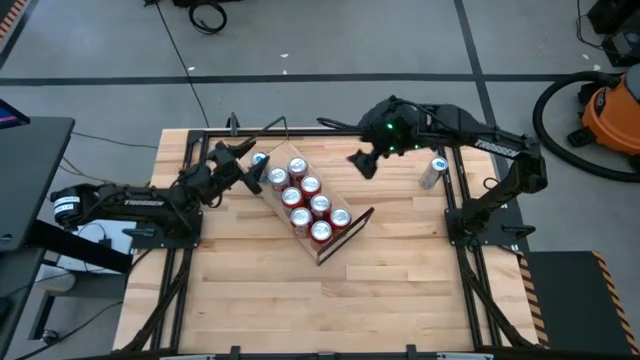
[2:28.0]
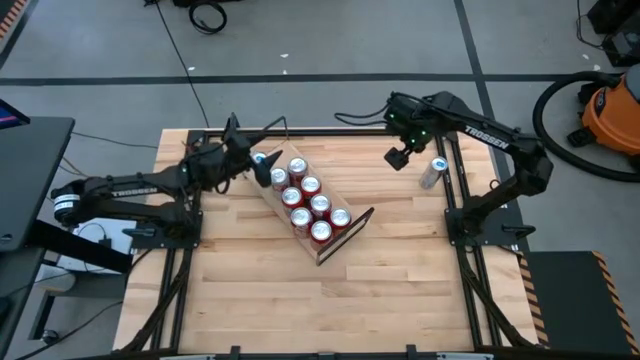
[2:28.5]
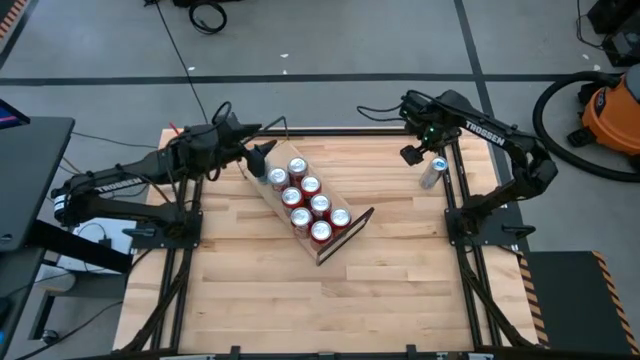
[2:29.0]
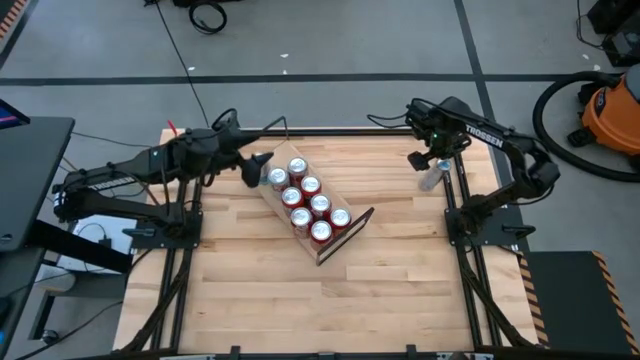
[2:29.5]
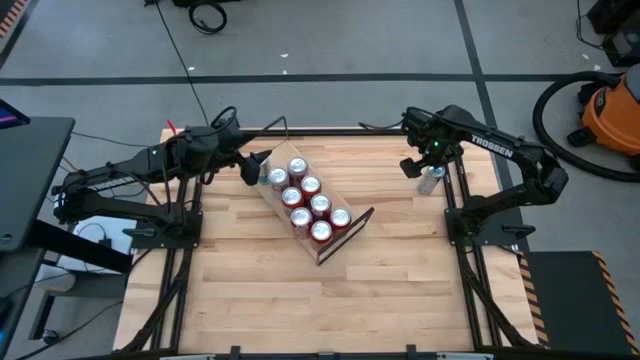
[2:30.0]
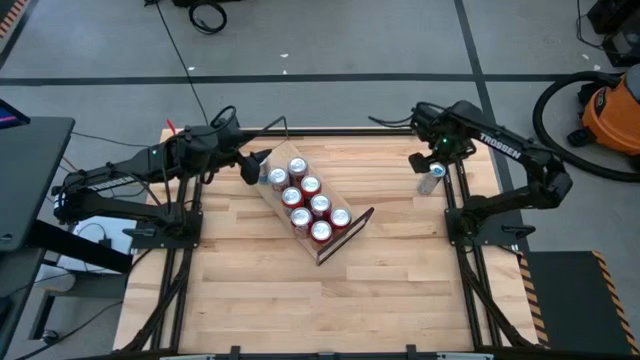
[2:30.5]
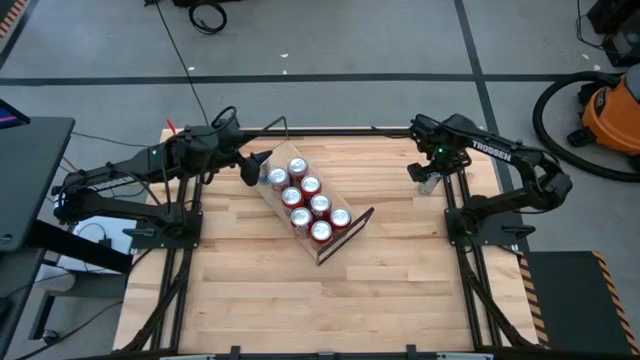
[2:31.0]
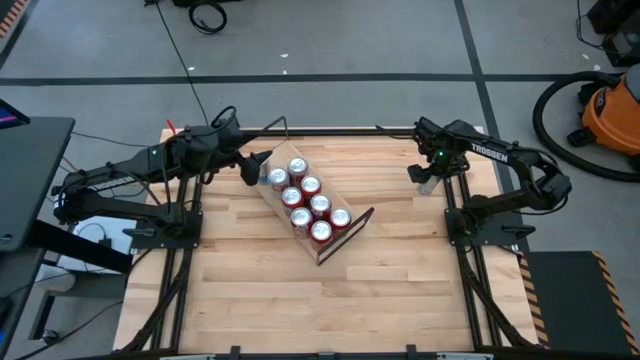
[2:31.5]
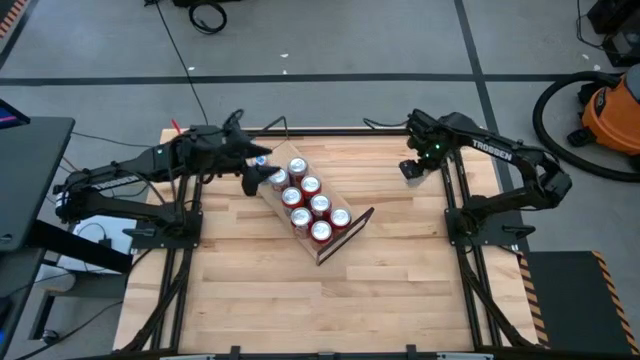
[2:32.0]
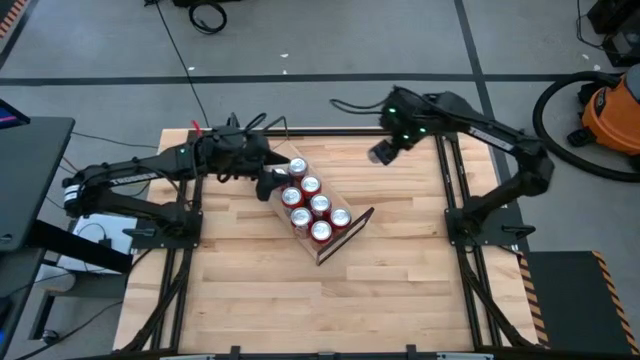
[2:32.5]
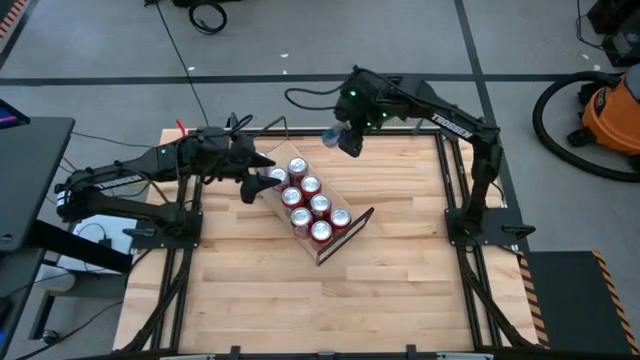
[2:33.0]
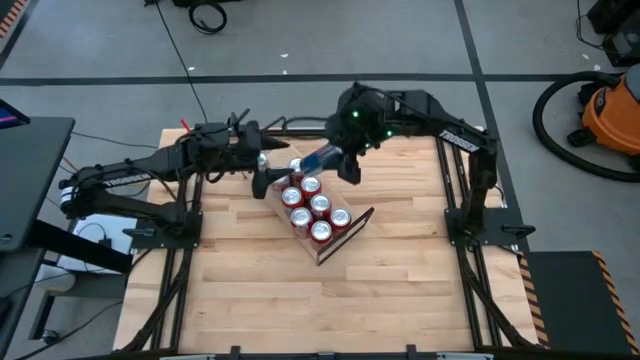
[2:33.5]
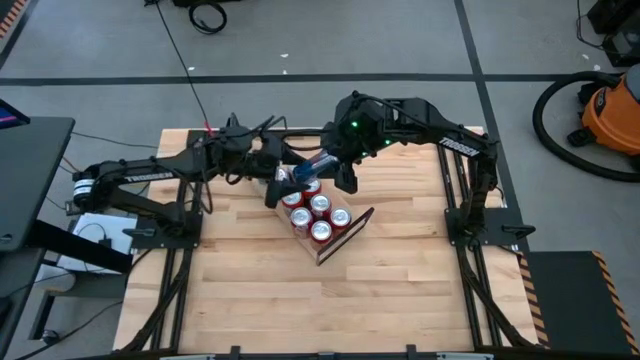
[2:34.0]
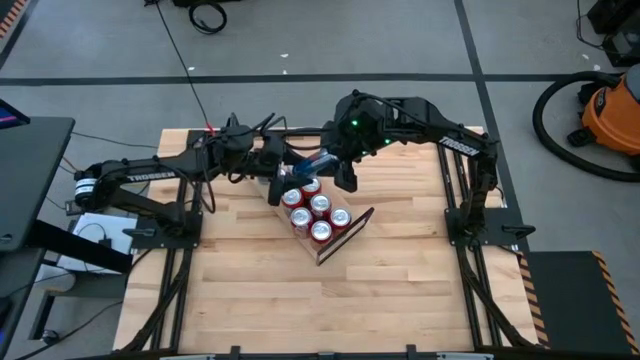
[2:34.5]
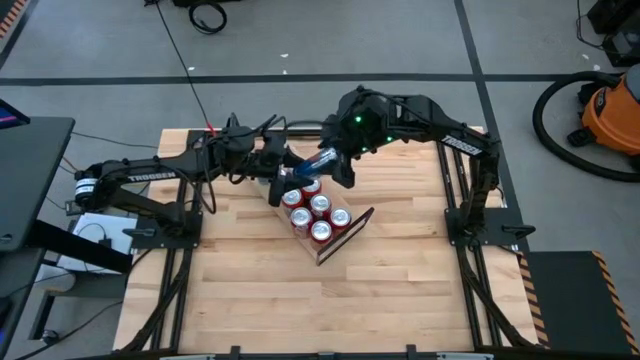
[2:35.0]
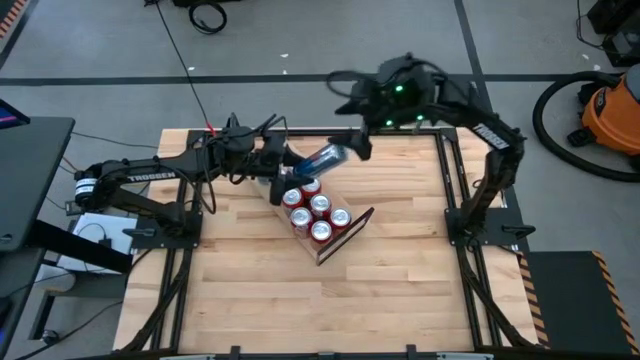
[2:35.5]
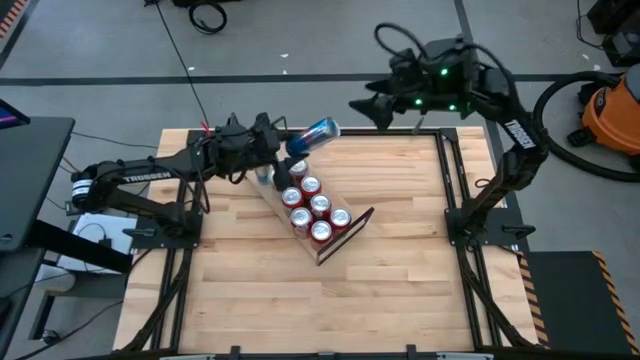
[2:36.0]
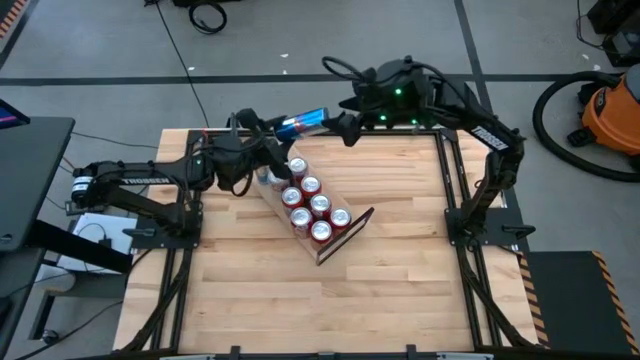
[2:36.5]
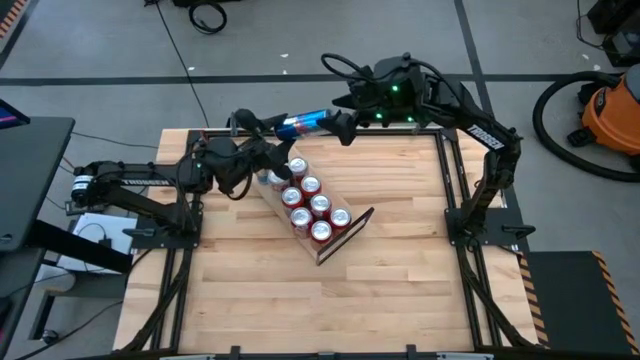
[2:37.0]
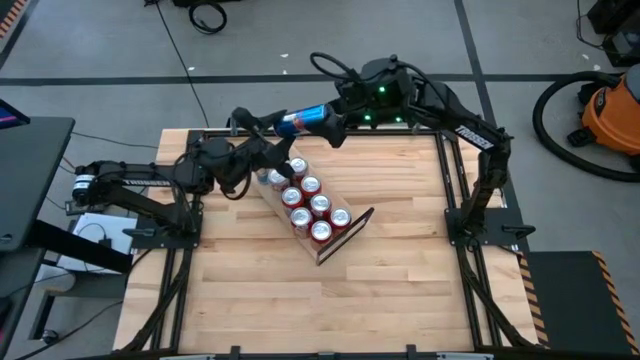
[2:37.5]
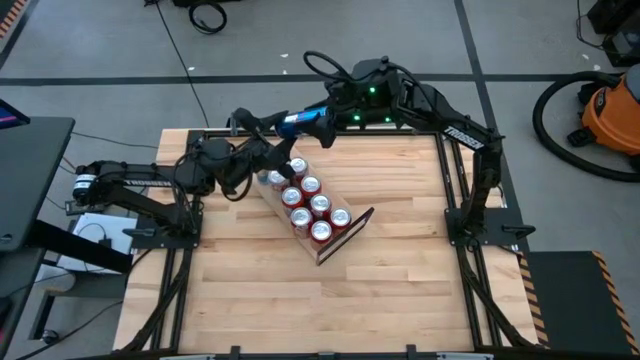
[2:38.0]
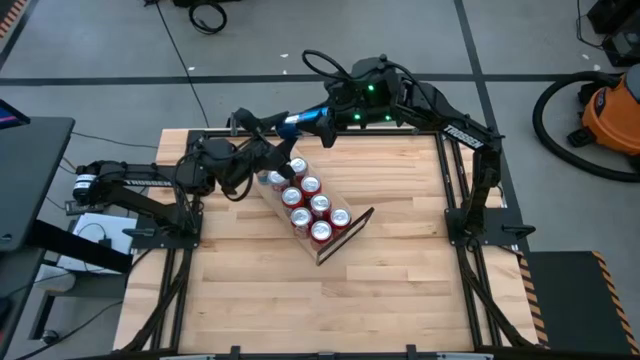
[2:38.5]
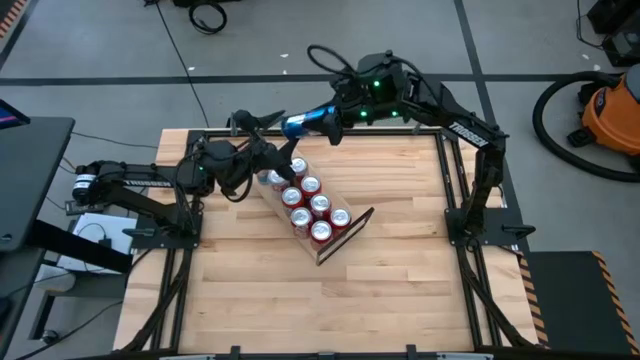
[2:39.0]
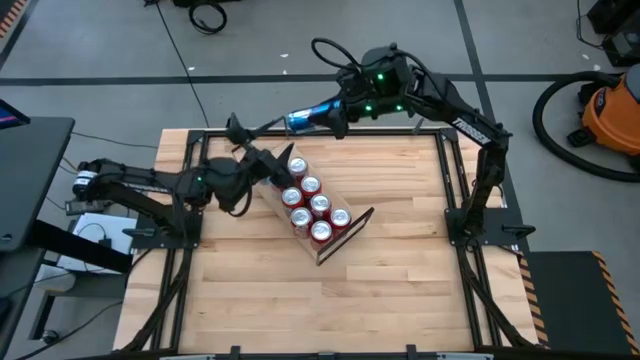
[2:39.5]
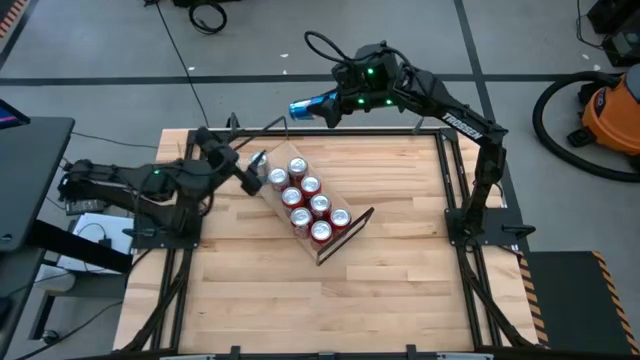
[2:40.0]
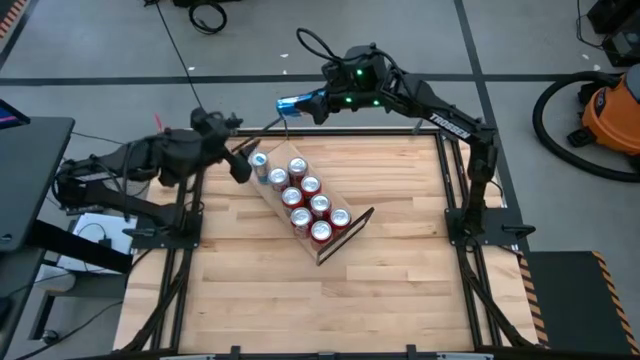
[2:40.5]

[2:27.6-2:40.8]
Task: Place canned beverage on shelf
Put the blue soda can on the shelf aligned with the other blue soda can

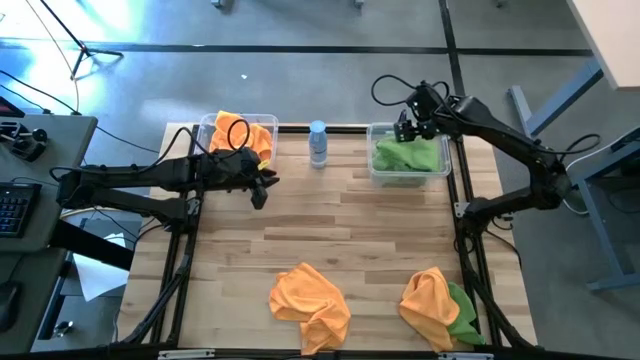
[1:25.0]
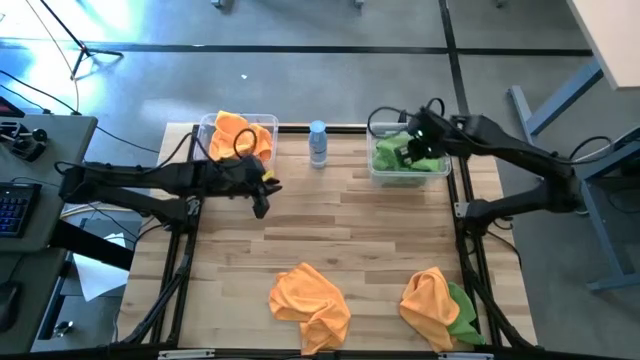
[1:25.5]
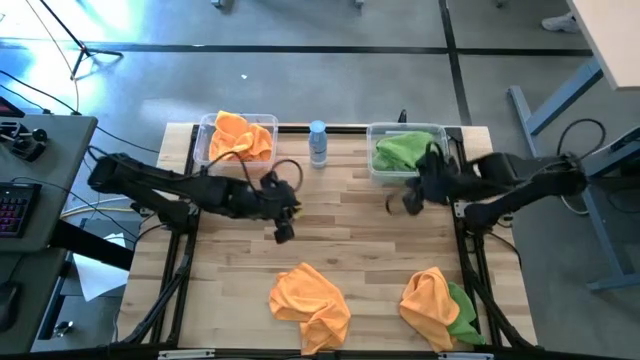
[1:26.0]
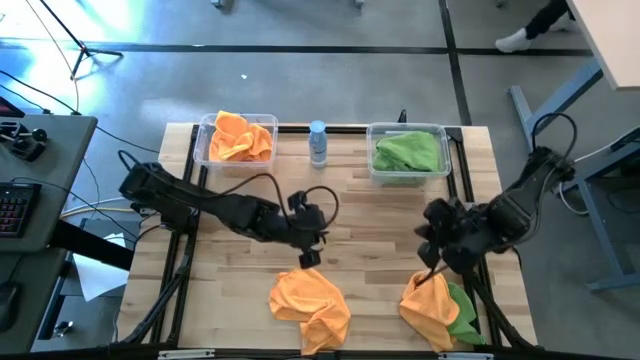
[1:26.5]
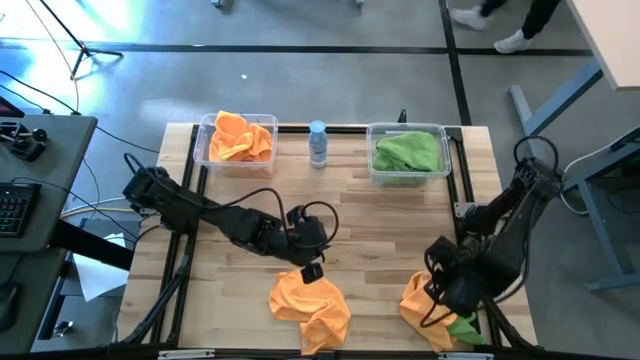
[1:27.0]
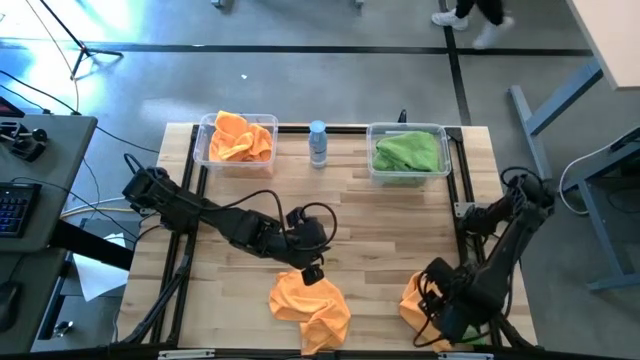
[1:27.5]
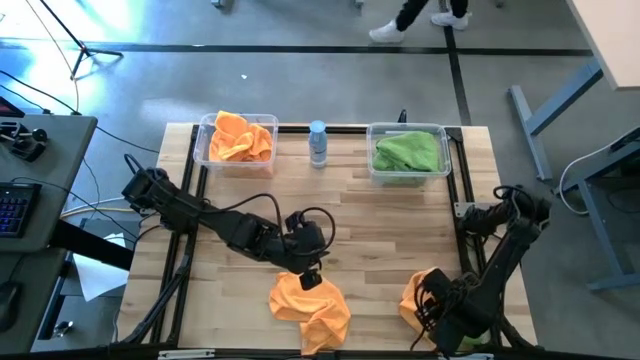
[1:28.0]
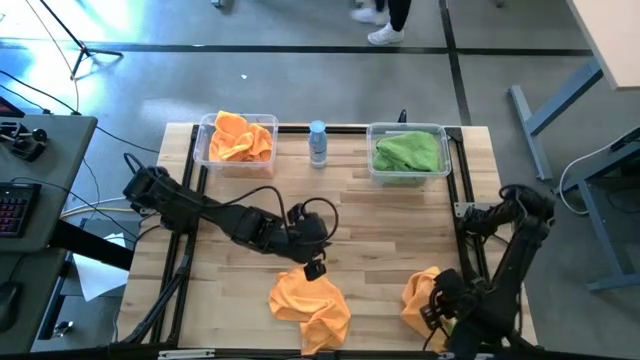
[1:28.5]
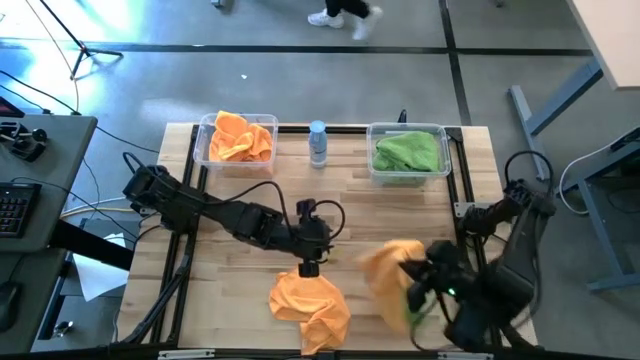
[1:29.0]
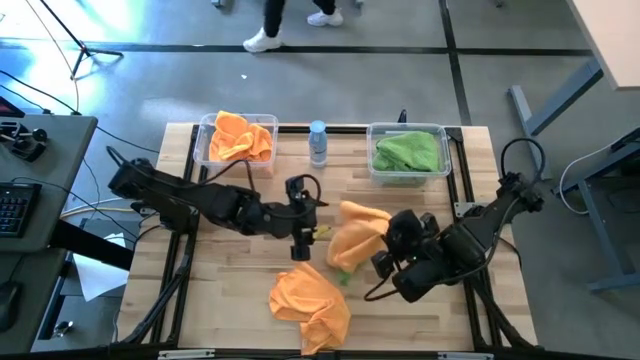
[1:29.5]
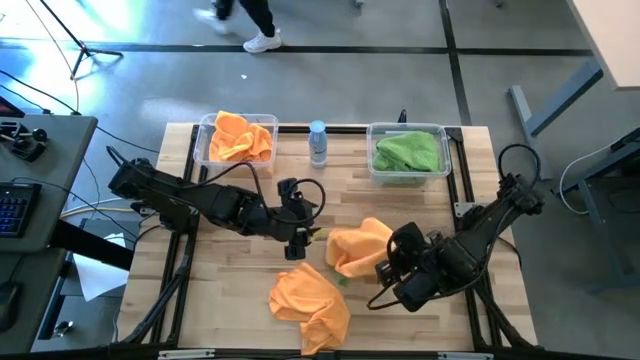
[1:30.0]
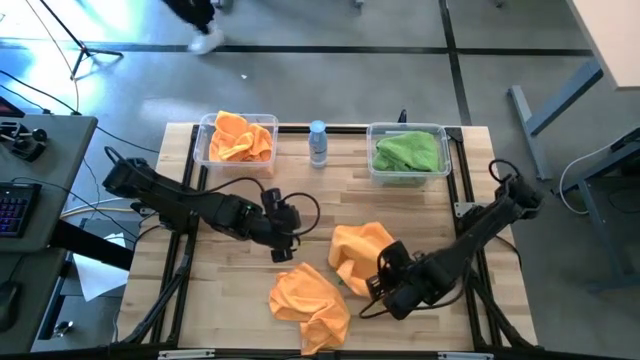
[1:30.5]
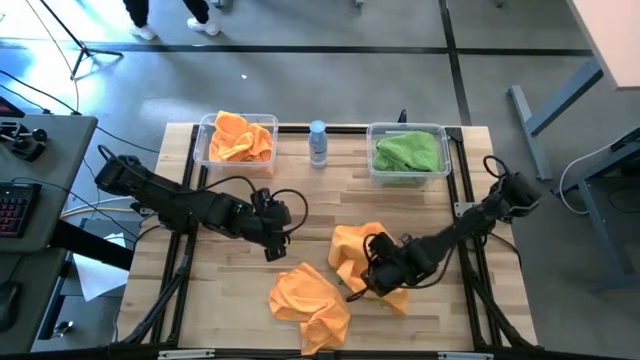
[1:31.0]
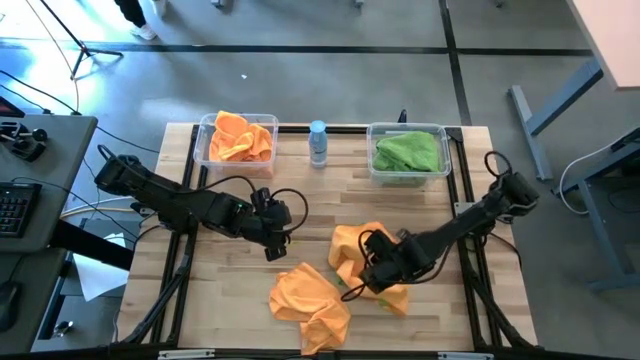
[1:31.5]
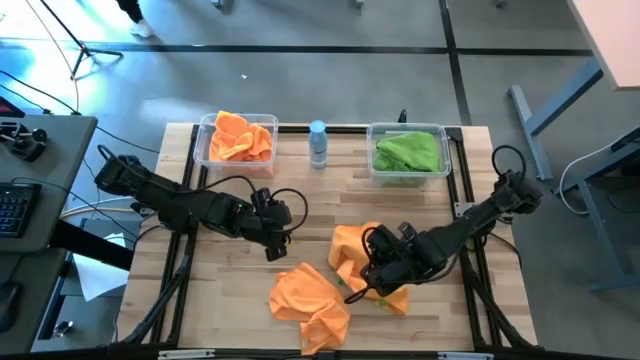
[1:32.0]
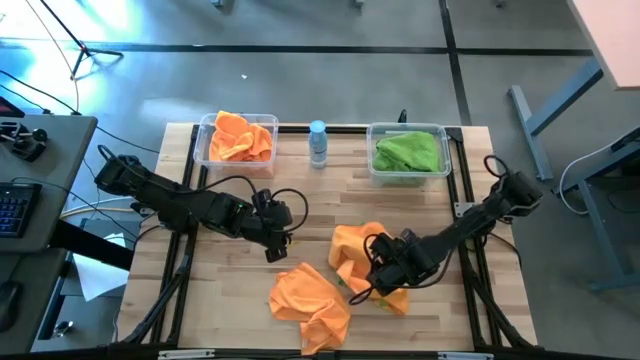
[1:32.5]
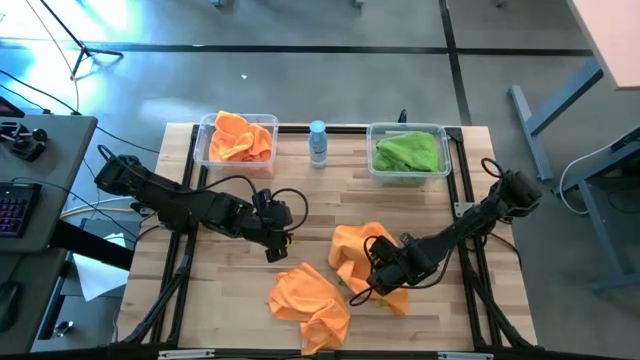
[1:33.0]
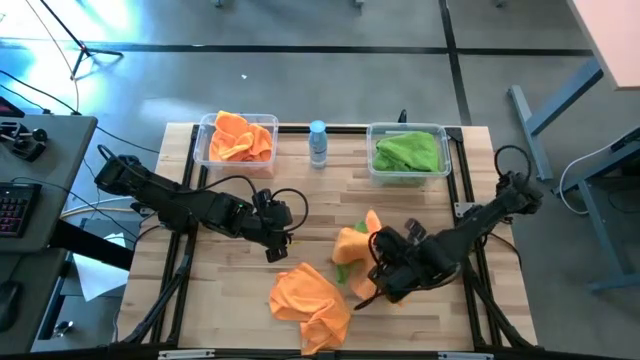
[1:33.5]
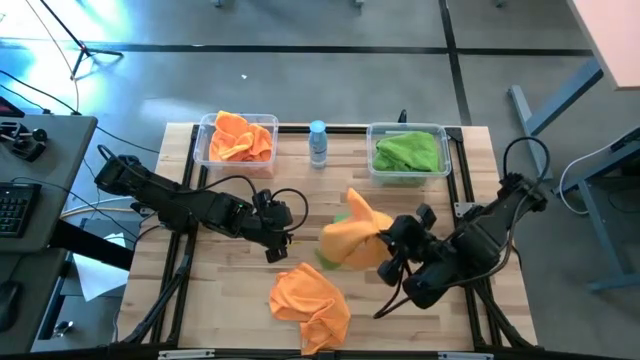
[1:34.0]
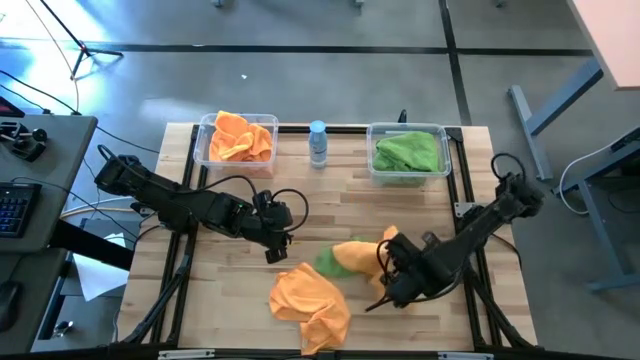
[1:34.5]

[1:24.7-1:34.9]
Task: Sort microfiber towel by color & place in baskets
Put the orange towel into the left transparent bin
